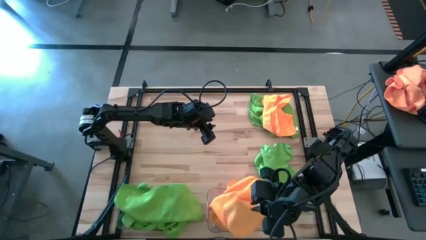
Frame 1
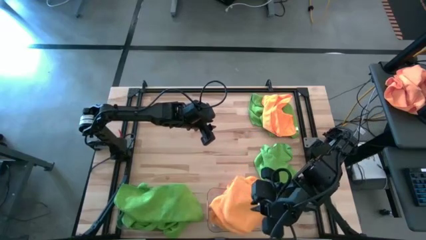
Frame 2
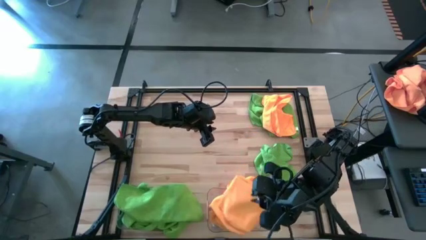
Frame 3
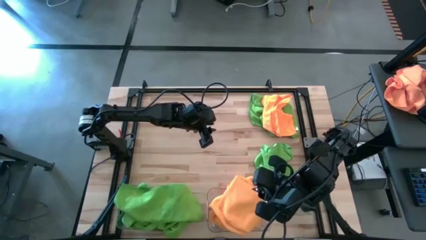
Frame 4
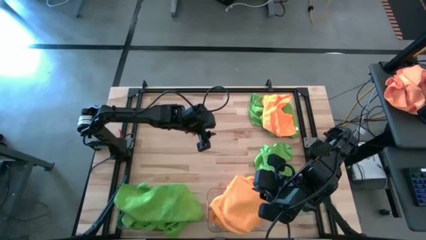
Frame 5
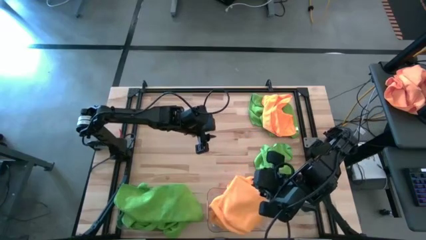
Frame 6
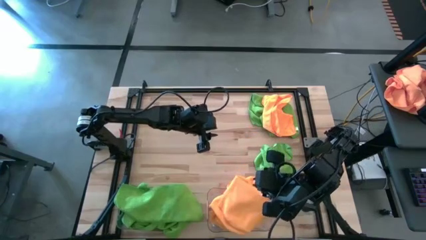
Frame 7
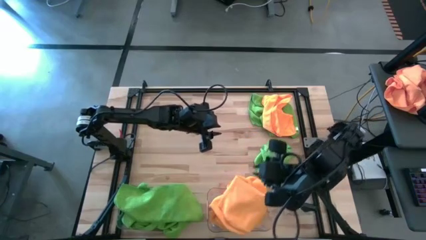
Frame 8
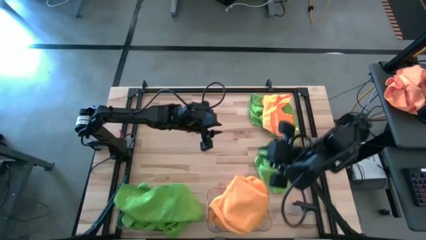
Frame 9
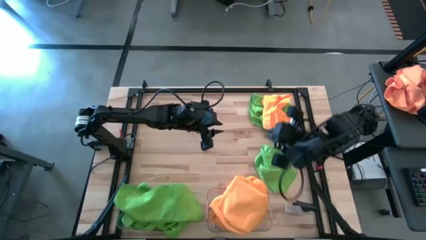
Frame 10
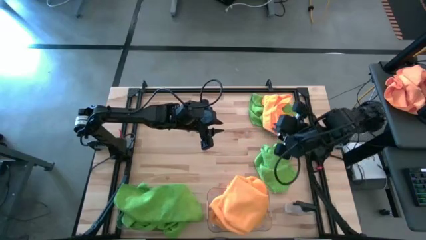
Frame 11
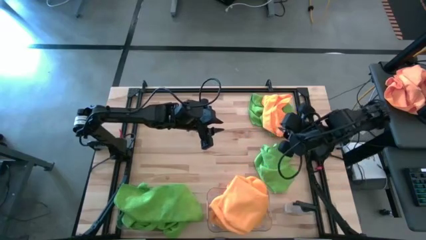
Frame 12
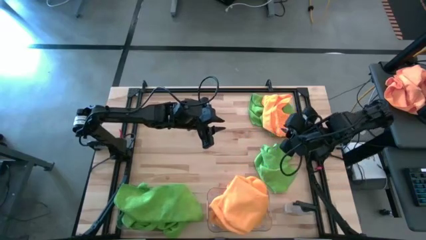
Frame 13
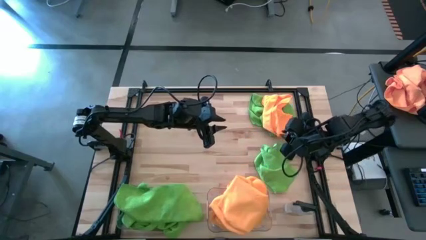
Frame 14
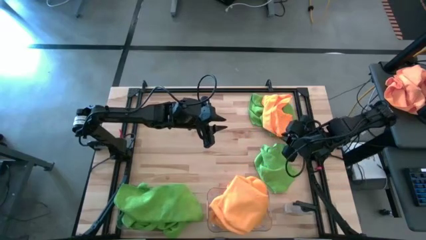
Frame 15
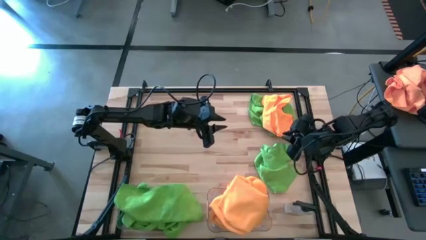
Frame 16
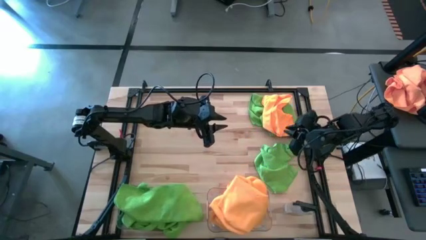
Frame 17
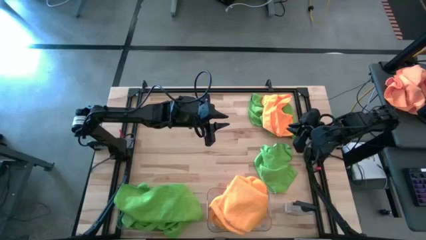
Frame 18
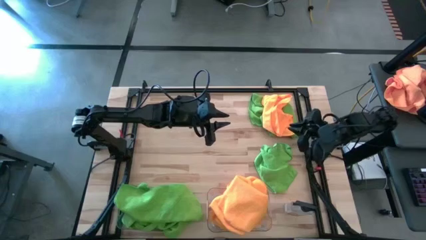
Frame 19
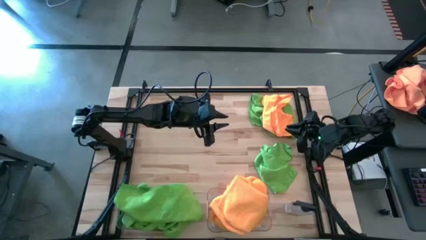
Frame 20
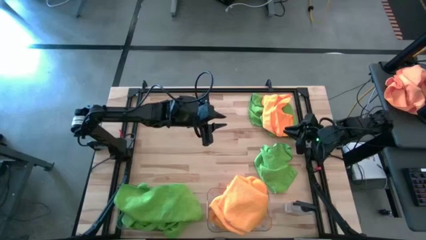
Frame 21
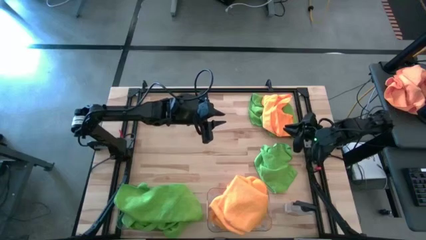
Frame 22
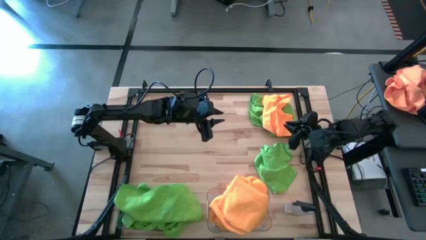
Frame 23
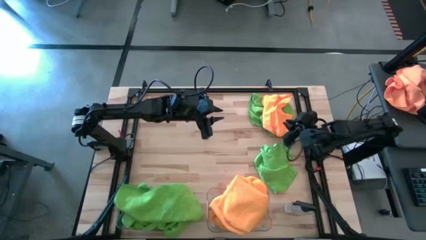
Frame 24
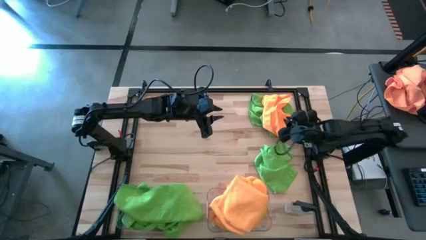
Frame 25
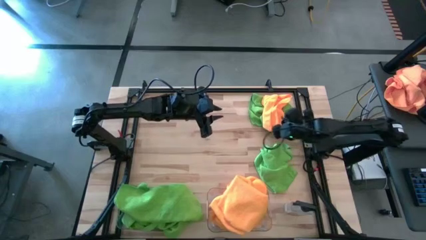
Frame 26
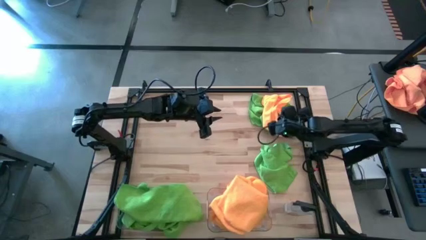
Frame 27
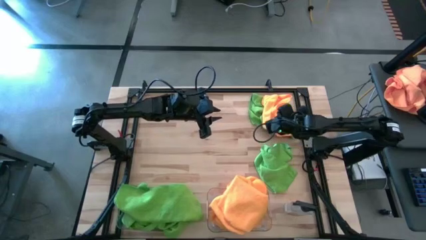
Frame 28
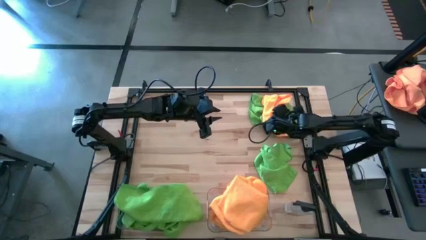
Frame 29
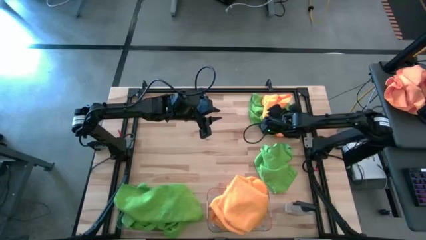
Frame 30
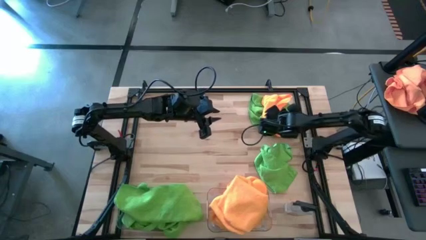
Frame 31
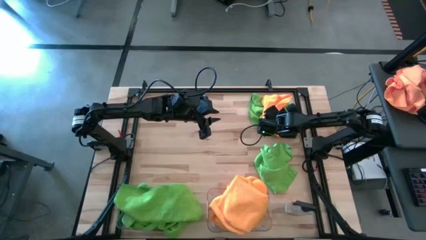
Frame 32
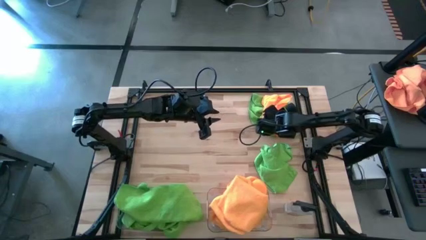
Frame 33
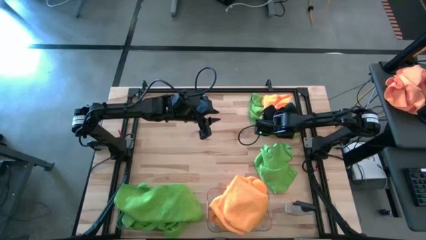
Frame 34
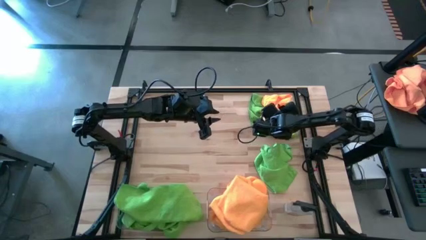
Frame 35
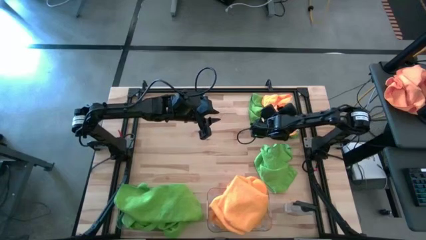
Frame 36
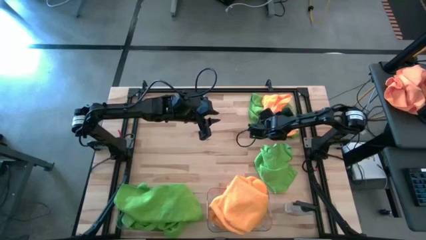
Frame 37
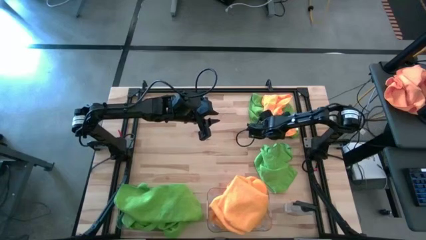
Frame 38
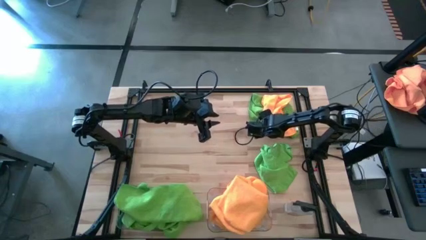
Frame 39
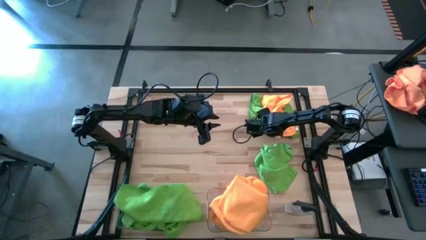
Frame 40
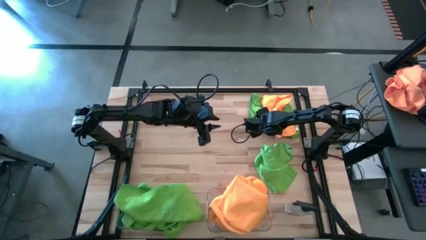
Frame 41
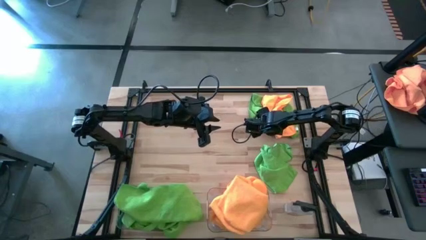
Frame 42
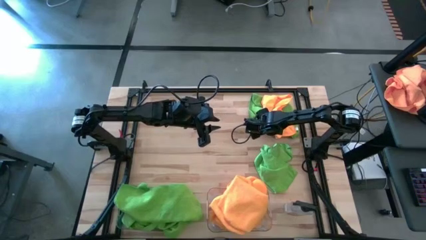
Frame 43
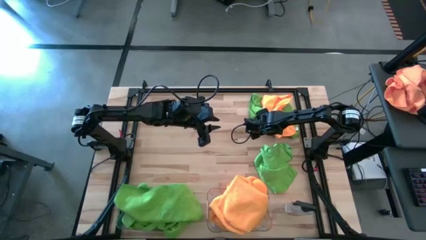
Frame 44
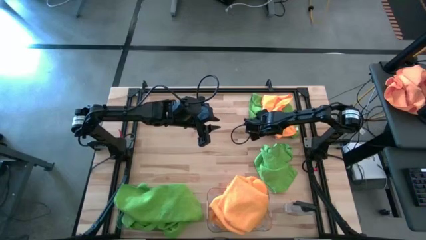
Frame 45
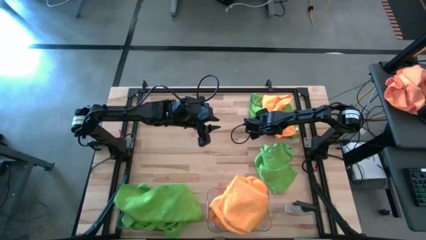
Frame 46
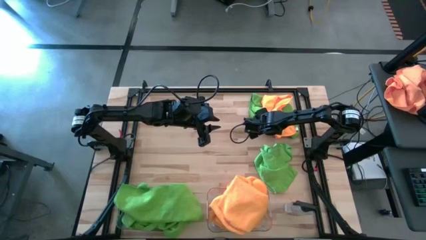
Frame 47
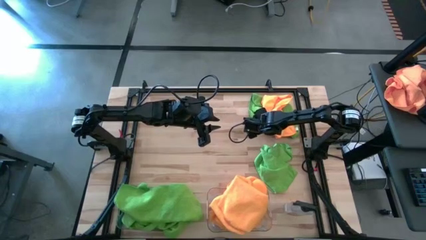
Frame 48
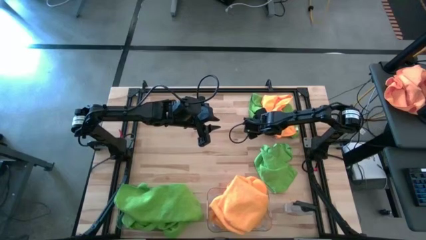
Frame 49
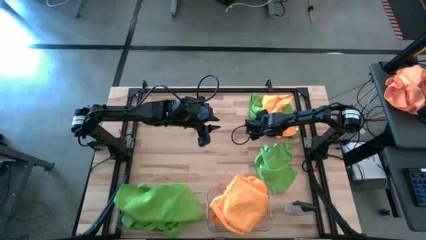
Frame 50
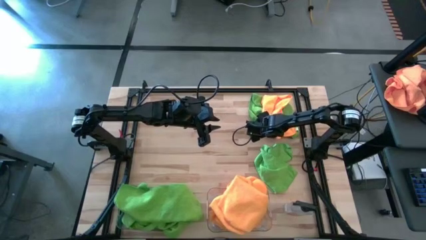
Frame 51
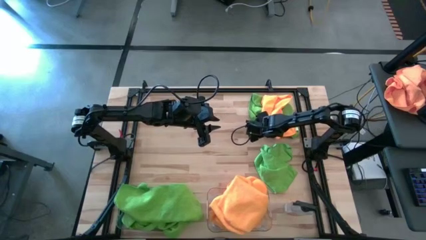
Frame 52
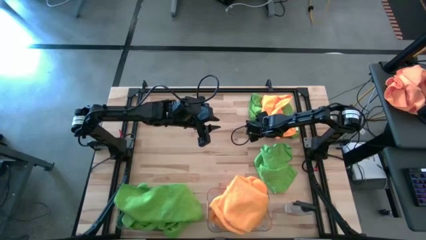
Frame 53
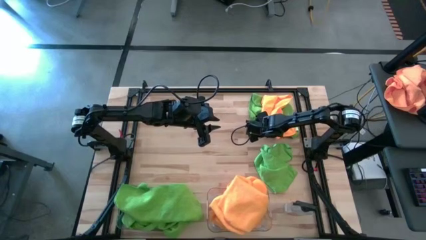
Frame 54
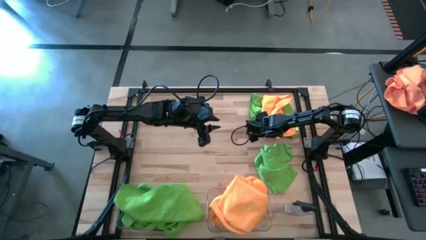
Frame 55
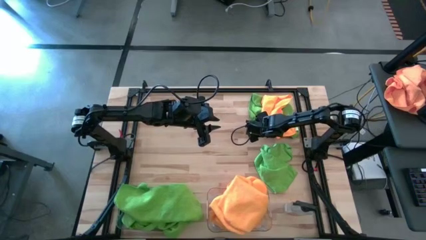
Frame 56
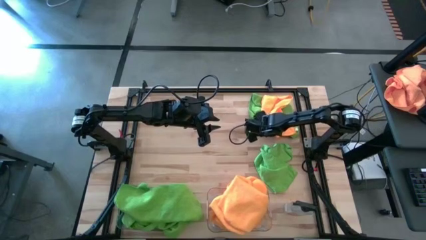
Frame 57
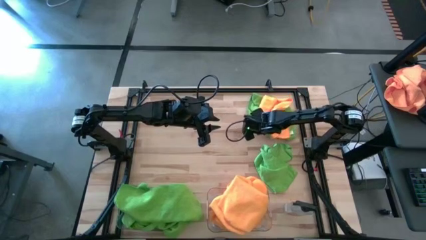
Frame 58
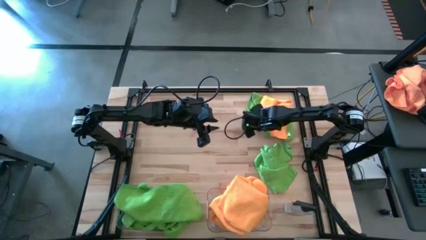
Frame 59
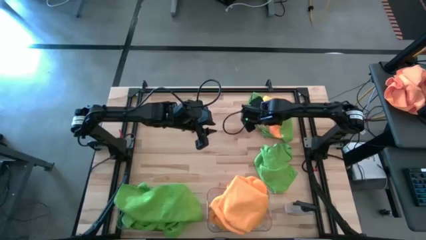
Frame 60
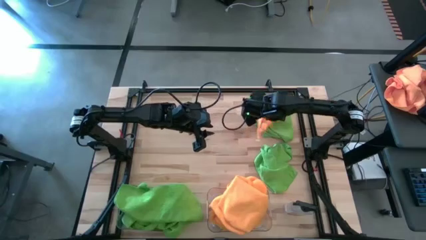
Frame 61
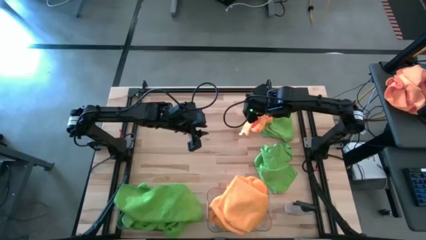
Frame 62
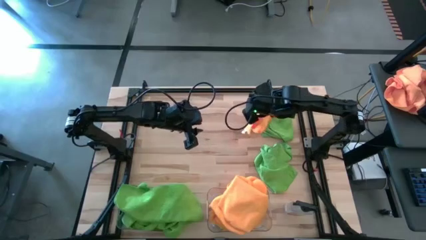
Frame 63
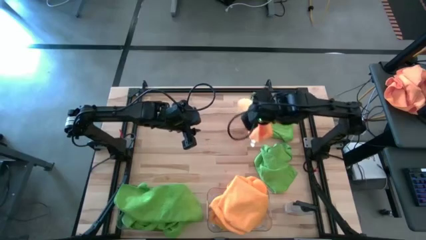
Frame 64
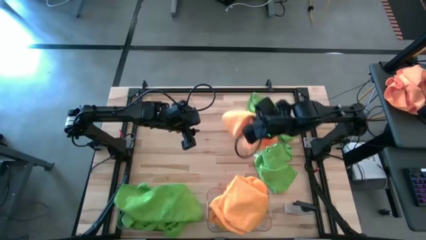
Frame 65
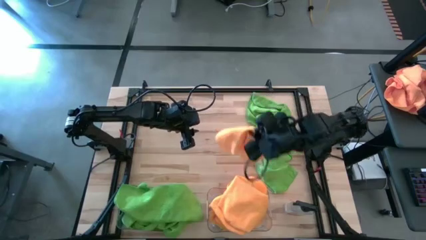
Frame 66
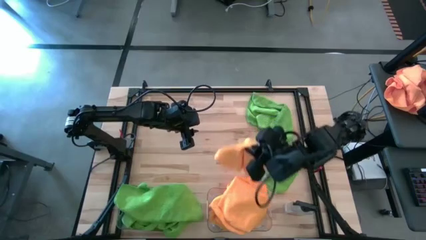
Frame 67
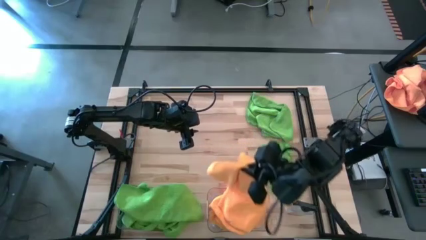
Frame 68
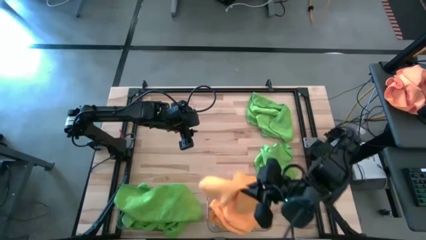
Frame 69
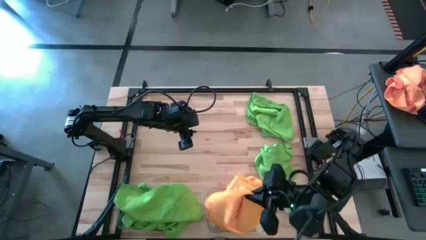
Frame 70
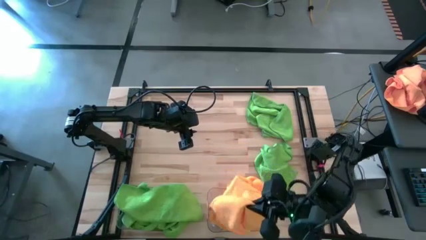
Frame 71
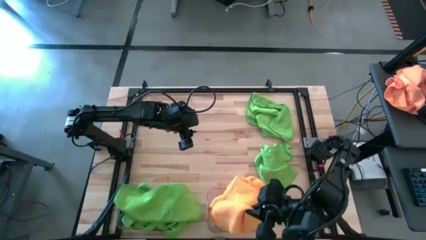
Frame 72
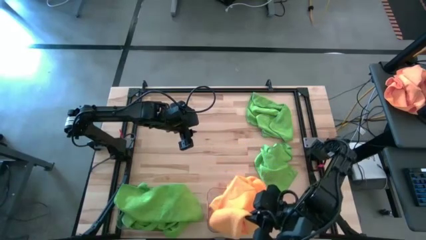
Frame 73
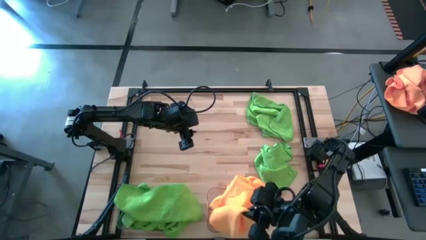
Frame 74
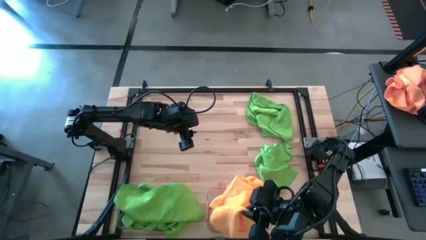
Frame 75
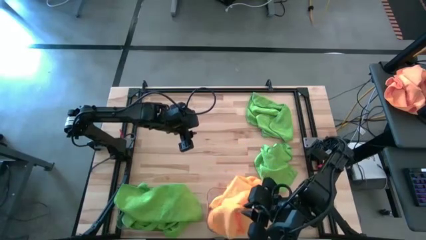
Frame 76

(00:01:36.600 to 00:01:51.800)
Task: Sort microfiber towel by color & place in baskets
Put the orange towel into the right transparent bin
